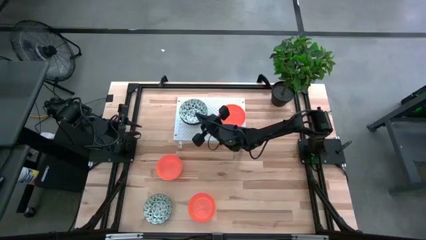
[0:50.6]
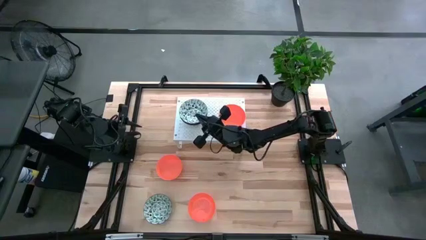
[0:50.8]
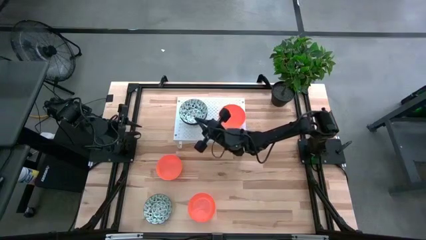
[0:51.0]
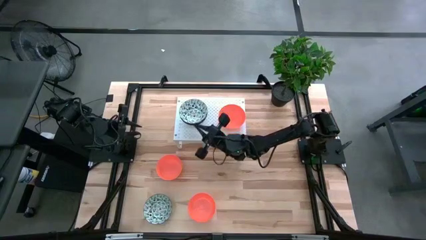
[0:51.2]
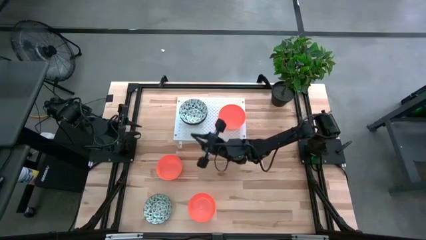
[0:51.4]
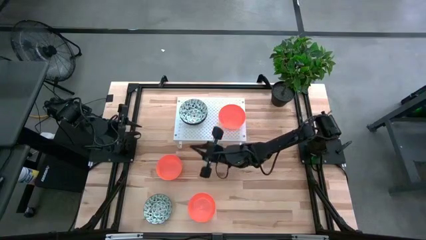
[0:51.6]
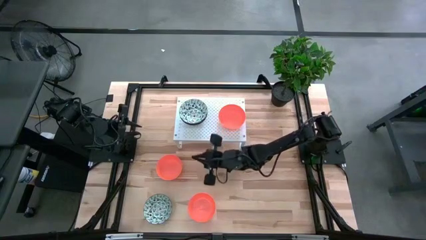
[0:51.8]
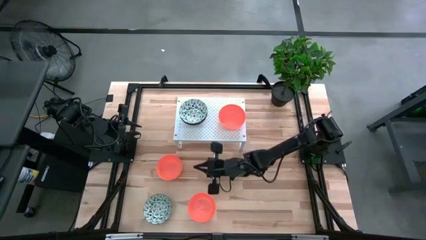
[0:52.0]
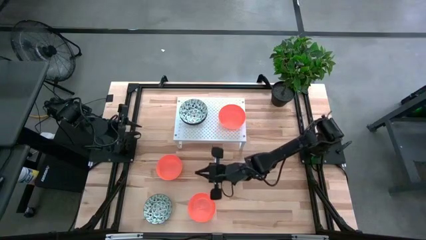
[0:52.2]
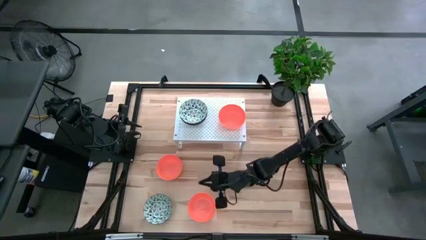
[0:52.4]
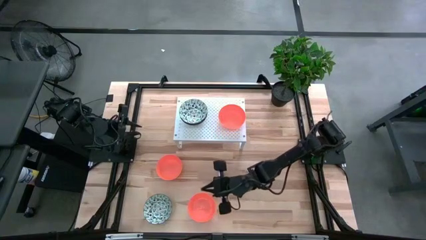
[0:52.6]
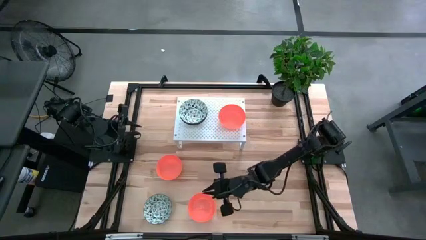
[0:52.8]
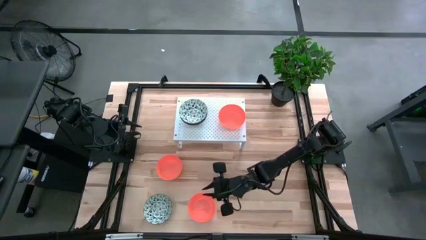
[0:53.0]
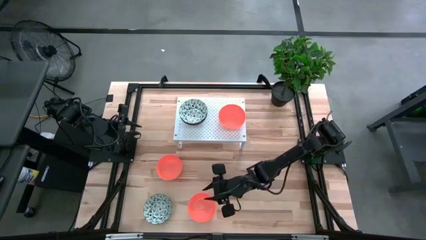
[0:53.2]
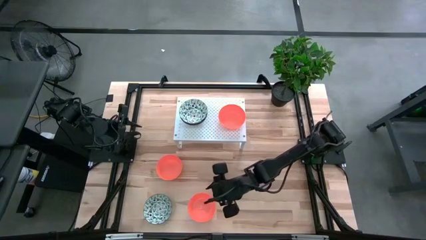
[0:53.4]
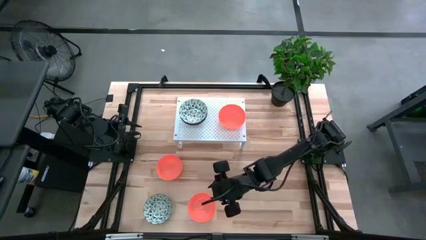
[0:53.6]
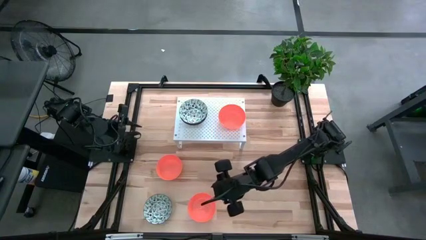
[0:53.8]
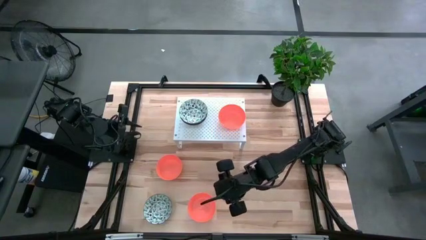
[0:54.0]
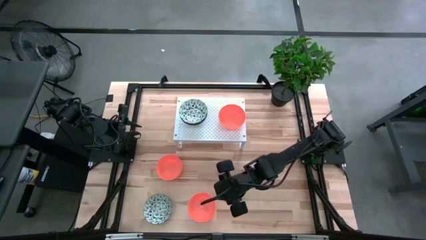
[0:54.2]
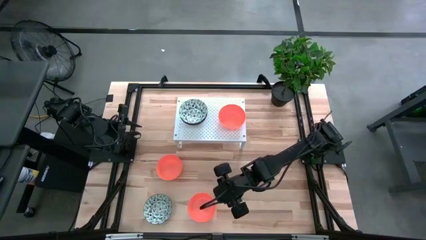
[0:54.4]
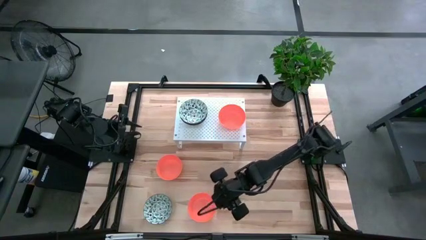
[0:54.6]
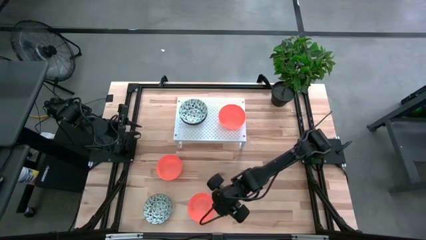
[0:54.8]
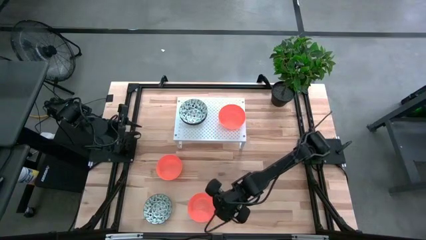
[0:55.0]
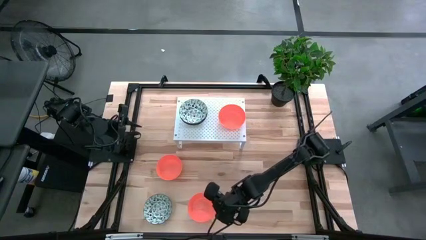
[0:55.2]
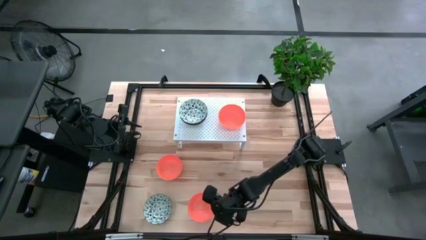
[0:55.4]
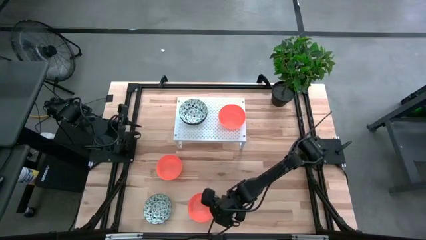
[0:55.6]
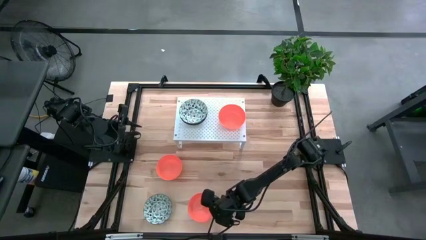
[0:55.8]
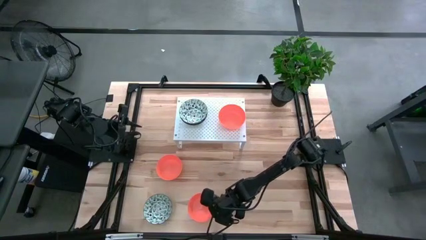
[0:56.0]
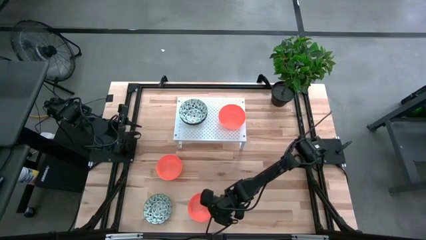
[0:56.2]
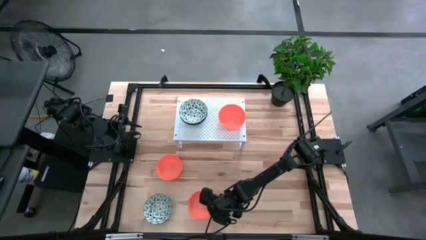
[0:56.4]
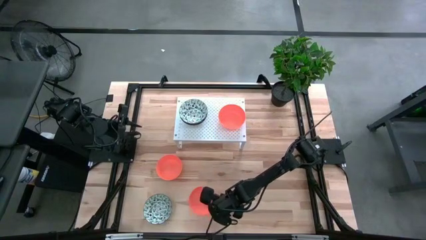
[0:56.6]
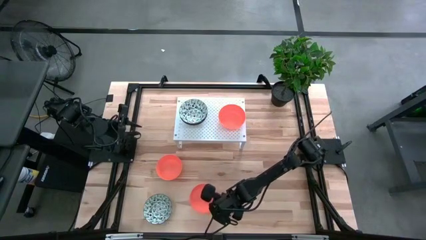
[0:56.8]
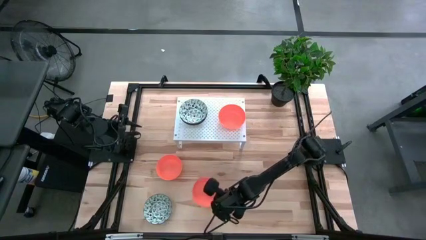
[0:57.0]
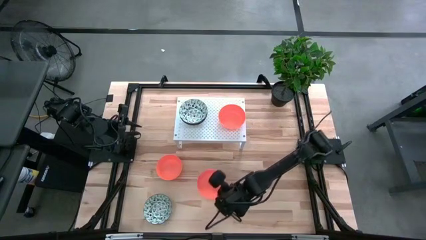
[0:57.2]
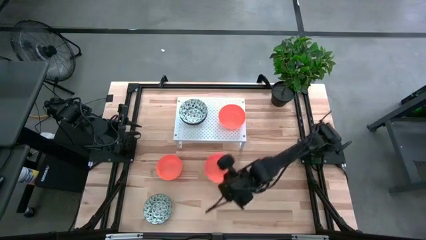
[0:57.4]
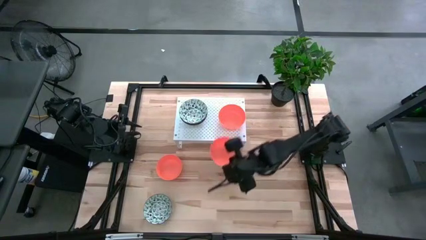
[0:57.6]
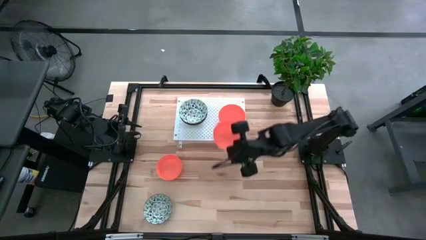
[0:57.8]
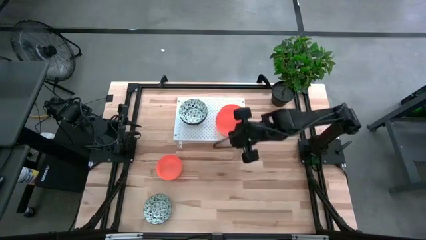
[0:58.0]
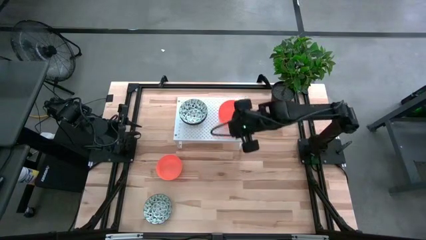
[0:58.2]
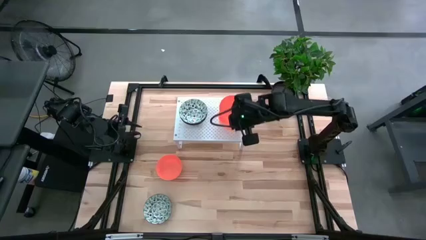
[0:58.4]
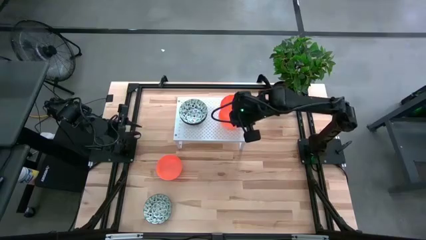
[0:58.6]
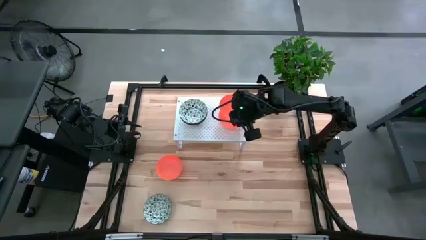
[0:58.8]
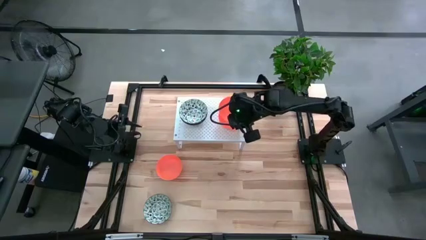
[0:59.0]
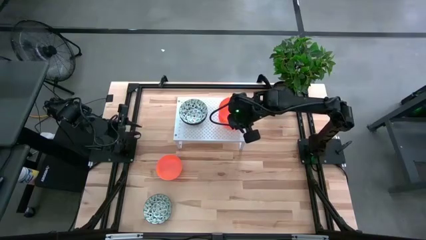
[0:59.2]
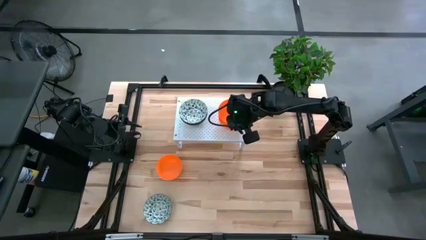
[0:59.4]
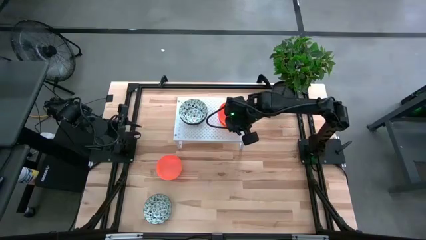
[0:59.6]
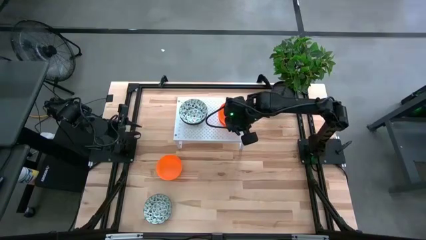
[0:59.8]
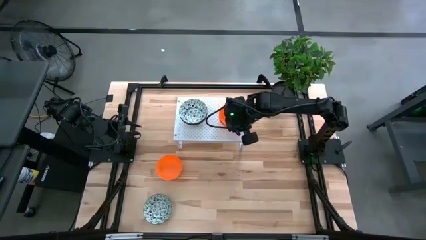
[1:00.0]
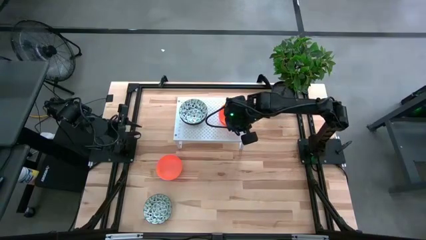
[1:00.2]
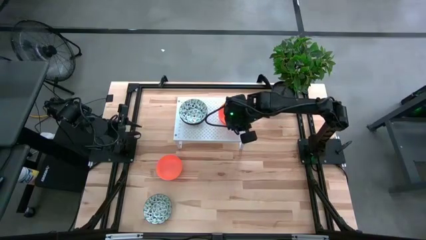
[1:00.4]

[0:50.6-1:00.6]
Task: Pick & Place Mini bowls
Stack the bottom orange bowl on top of the orange bowl on the shelf

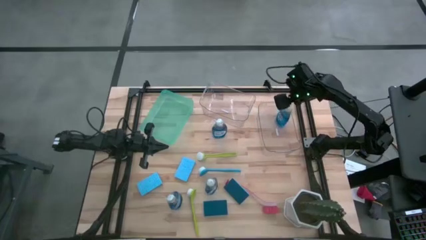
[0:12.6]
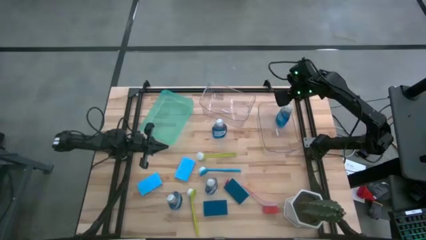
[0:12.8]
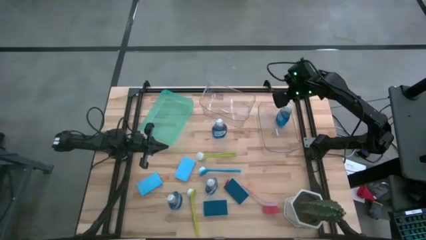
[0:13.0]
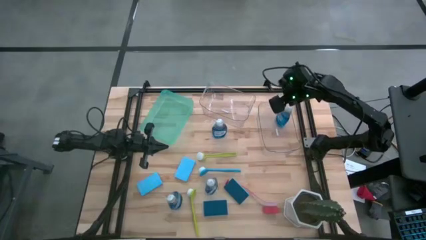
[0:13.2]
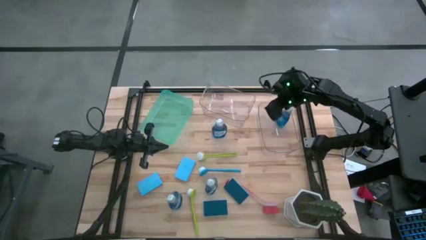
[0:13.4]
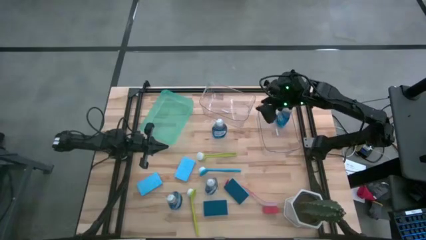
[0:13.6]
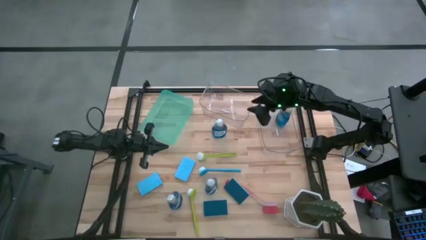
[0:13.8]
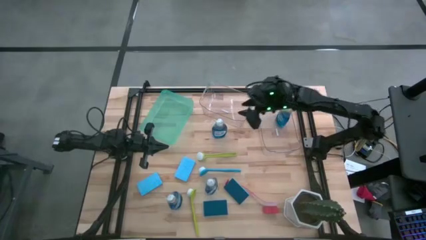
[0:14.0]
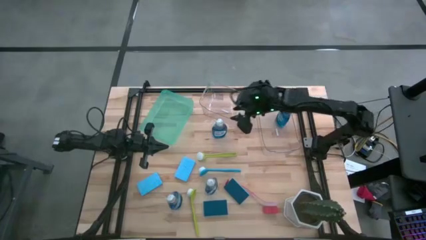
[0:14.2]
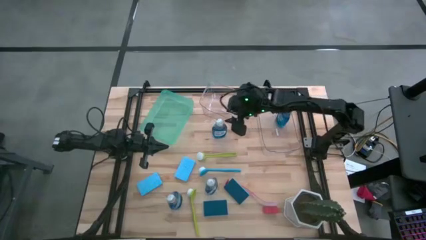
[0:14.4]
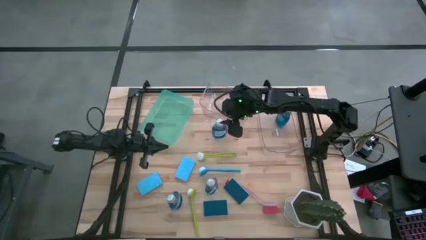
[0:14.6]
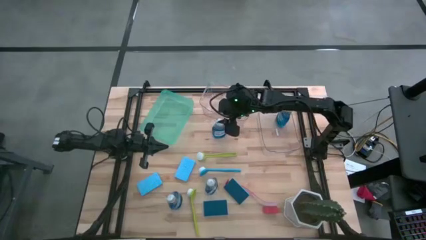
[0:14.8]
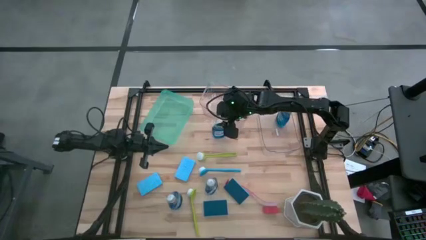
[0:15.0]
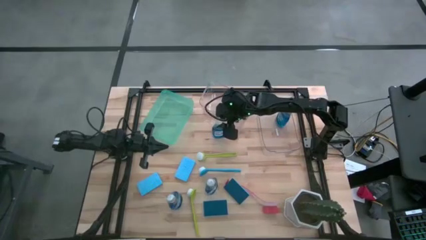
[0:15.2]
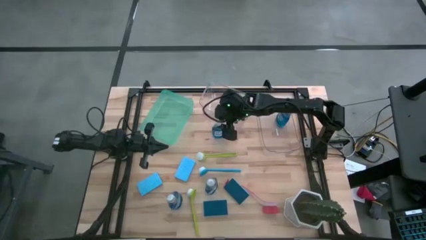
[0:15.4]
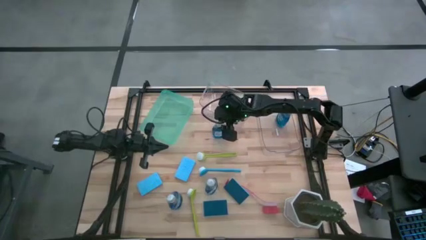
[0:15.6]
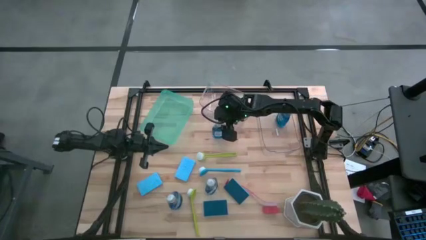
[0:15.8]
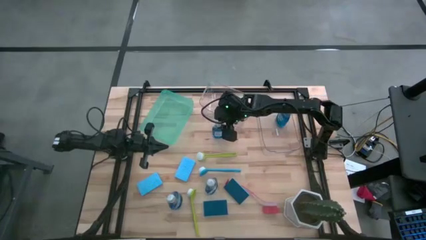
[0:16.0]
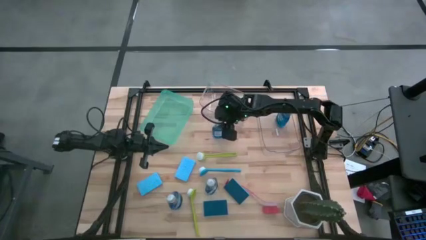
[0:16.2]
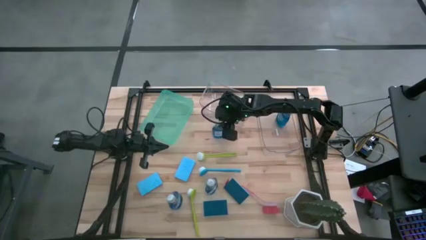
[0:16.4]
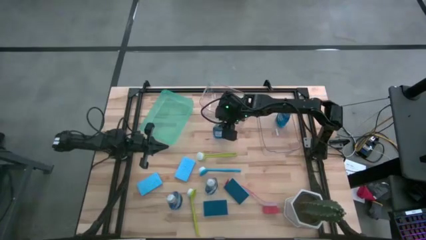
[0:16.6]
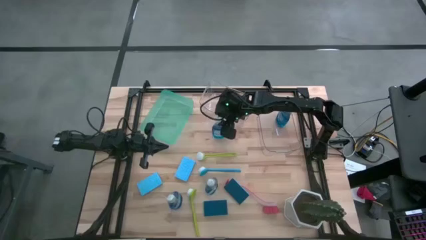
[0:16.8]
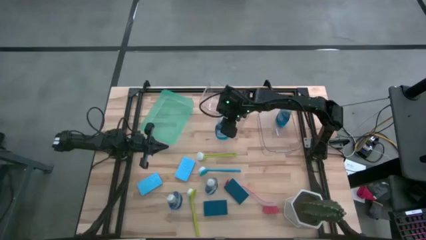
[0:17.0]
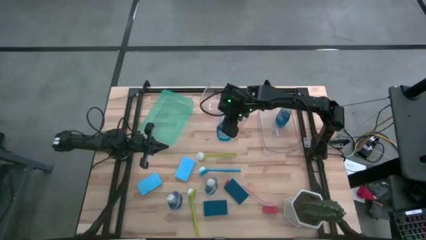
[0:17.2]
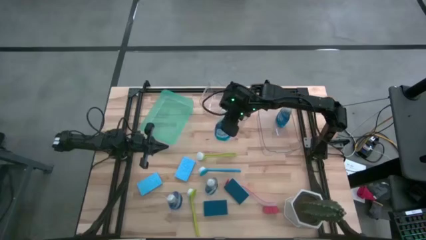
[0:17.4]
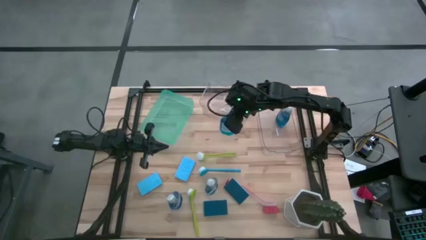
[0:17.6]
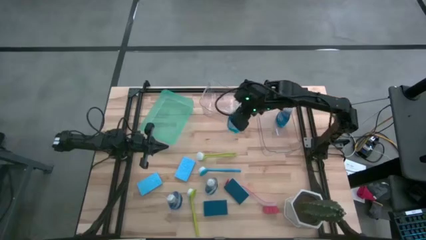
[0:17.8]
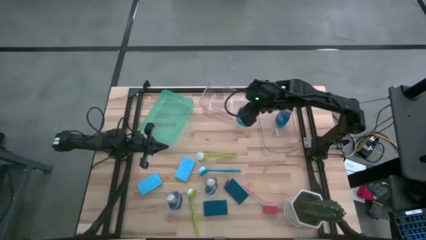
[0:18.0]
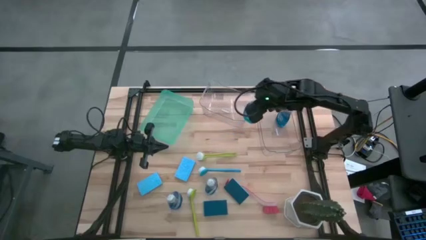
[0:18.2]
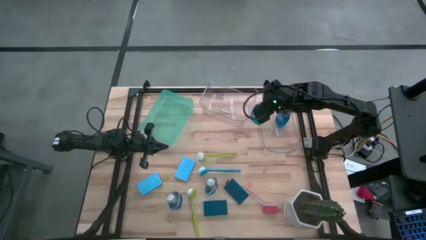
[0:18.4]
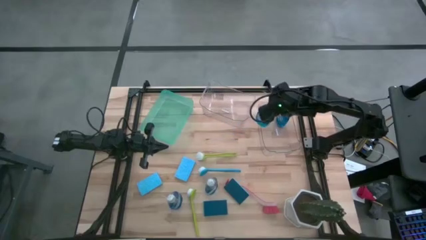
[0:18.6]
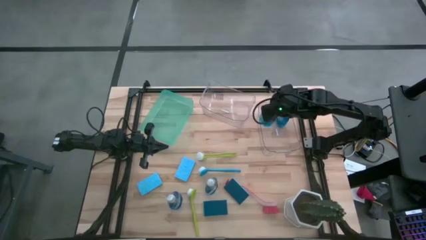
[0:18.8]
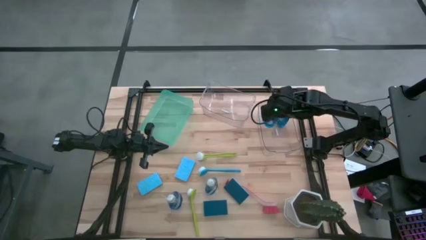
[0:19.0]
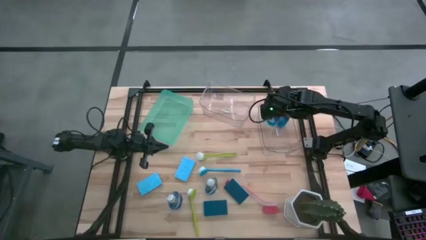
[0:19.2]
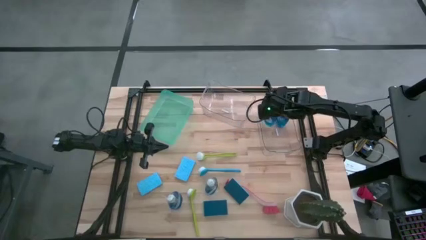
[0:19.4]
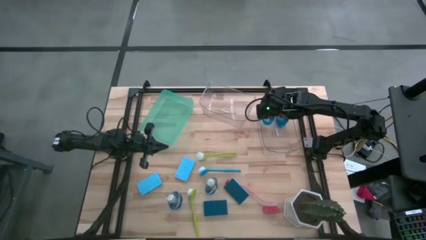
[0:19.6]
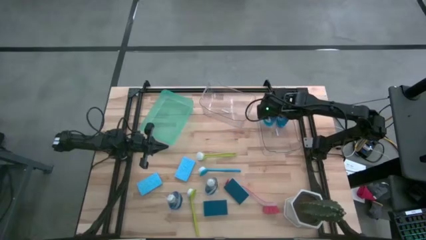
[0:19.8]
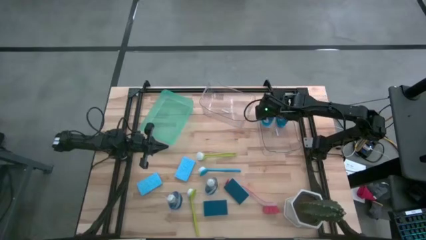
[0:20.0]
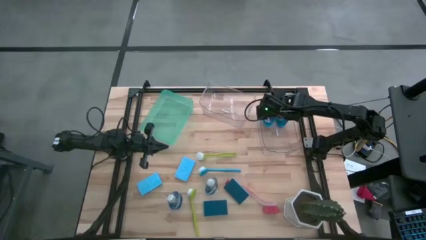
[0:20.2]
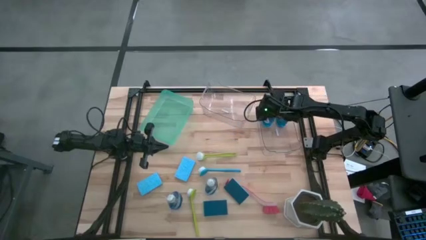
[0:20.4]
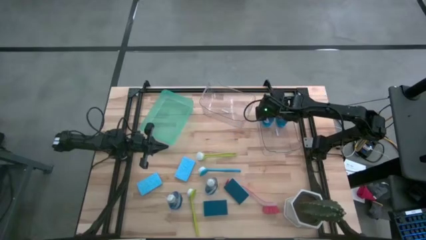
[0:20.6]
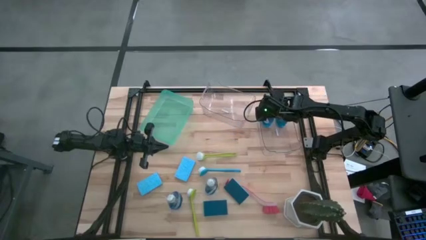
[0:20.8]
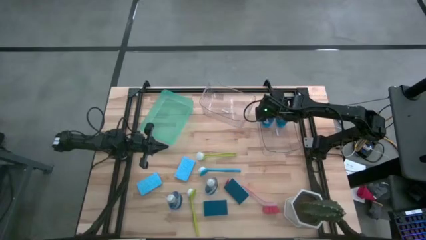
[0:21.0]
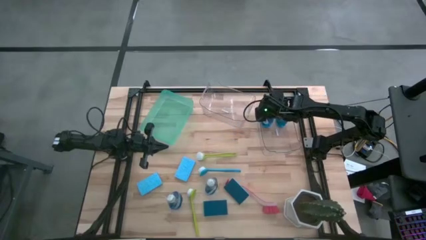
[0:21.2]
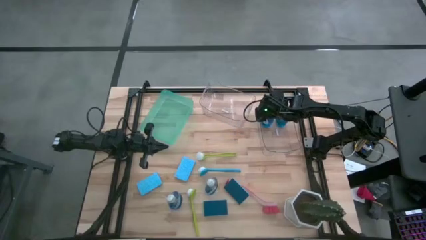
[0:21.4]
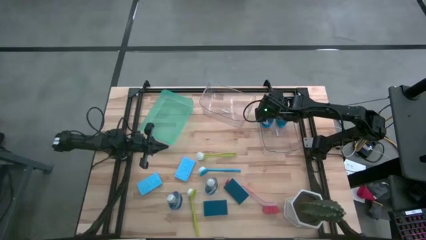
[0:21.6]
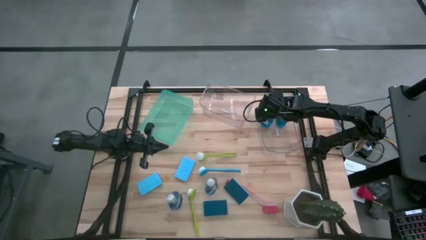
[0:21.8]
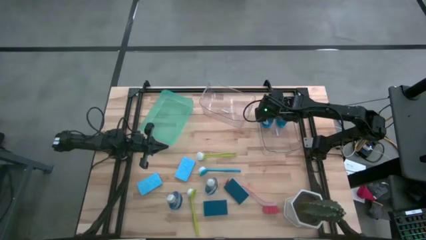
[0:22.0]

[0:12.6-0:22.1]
Task: Pick & Place Kitchen Sink Supplies
Put the blue dishwashing liquid bottle into the right transparent bin
